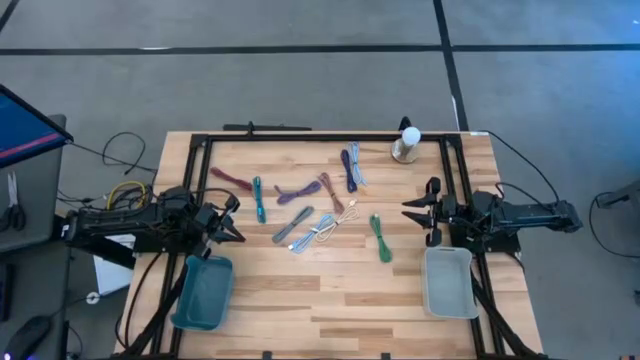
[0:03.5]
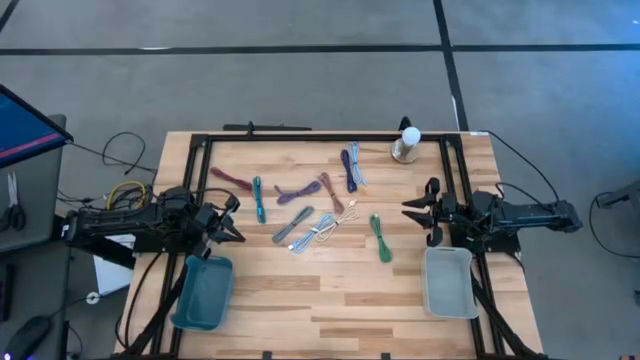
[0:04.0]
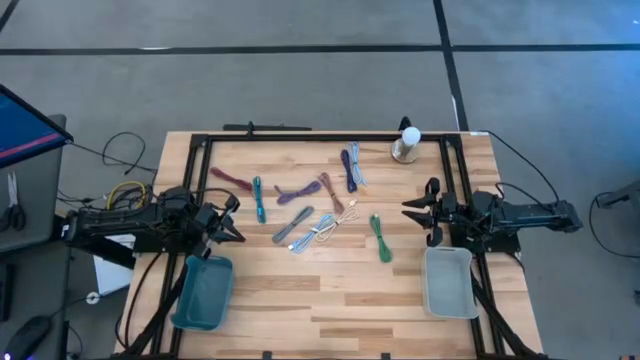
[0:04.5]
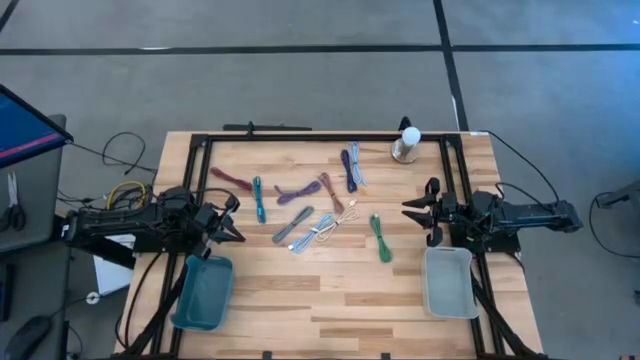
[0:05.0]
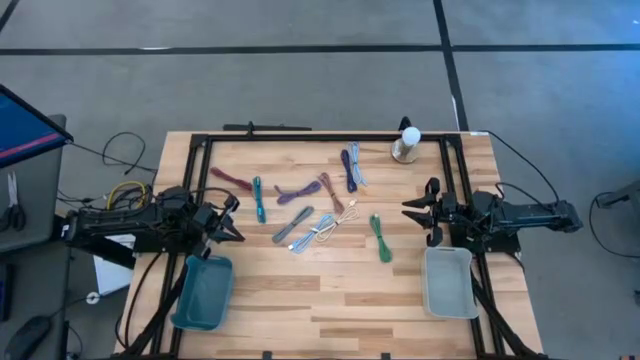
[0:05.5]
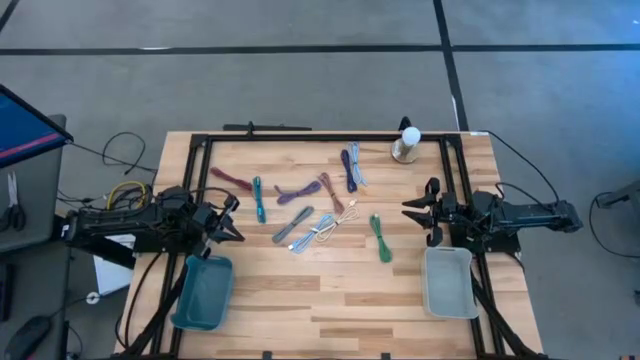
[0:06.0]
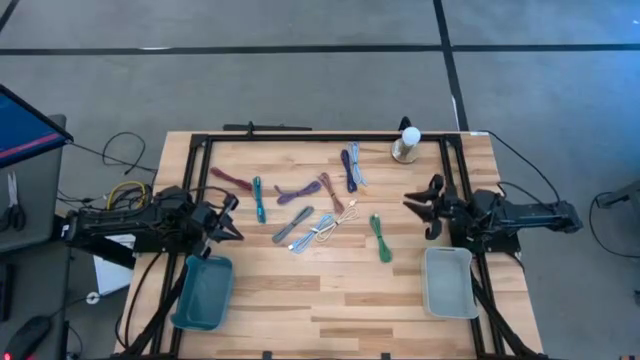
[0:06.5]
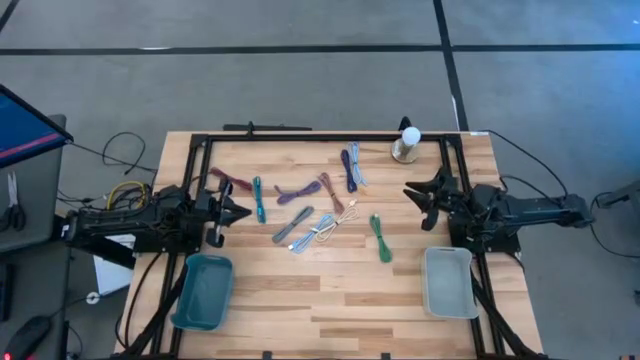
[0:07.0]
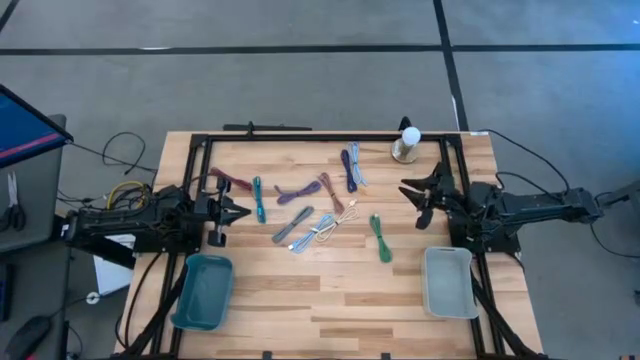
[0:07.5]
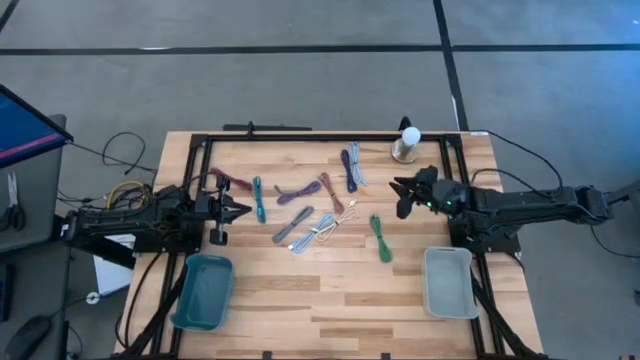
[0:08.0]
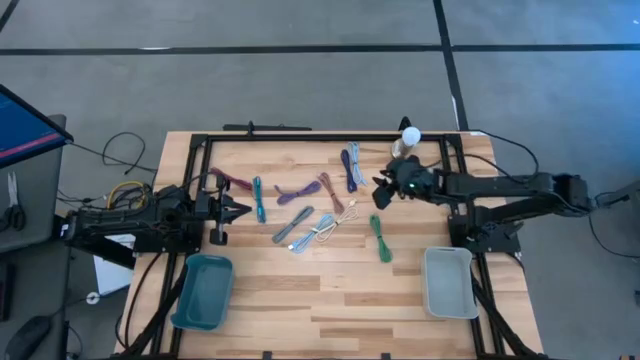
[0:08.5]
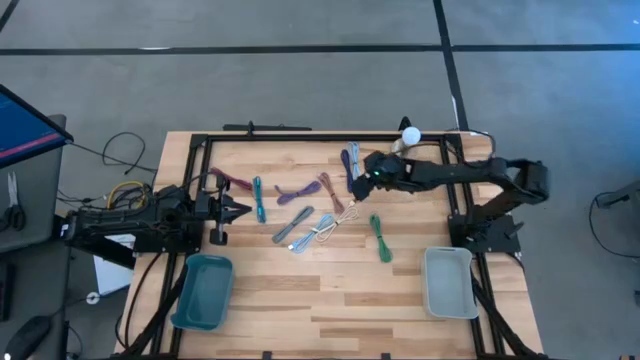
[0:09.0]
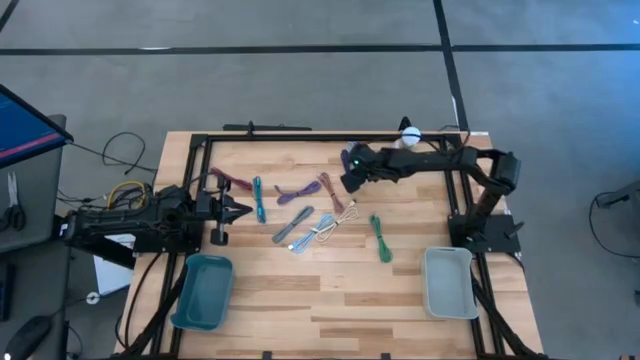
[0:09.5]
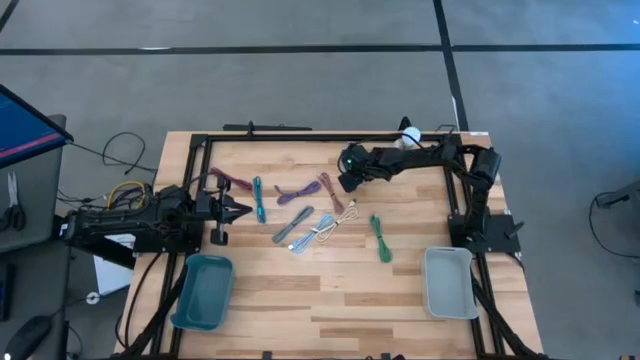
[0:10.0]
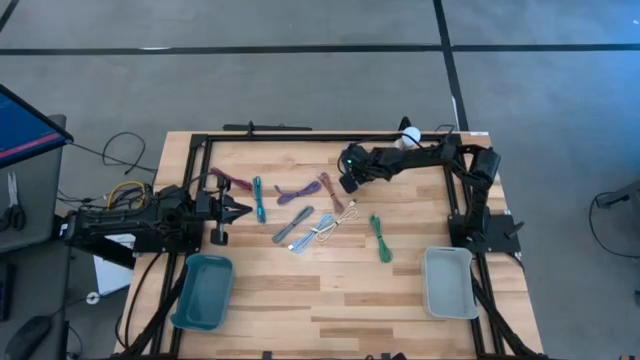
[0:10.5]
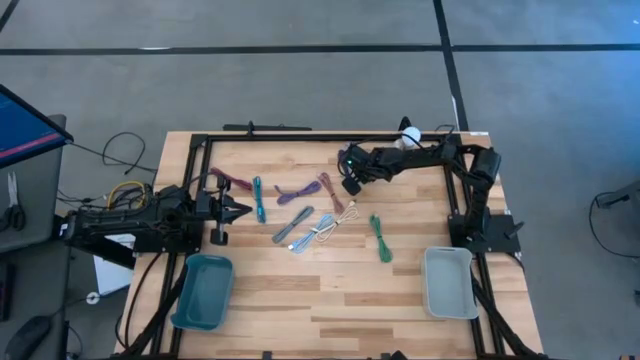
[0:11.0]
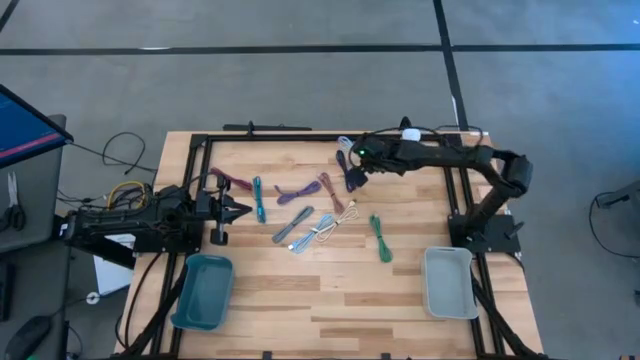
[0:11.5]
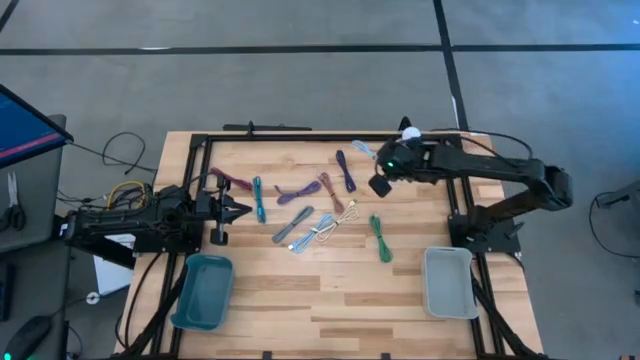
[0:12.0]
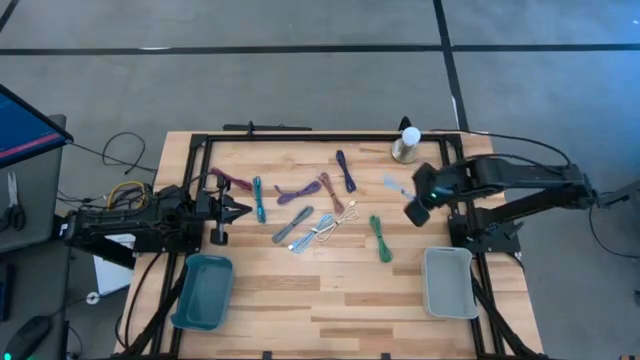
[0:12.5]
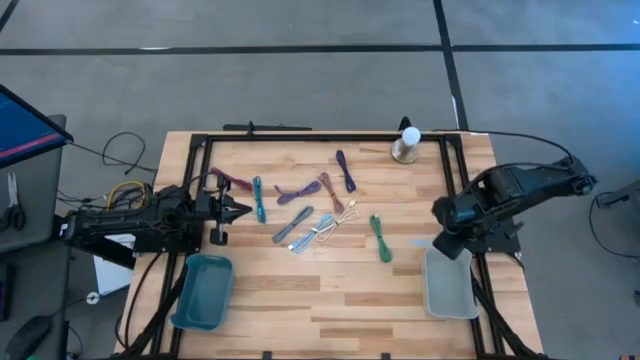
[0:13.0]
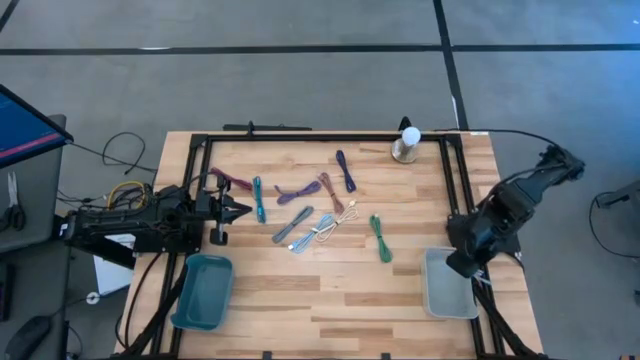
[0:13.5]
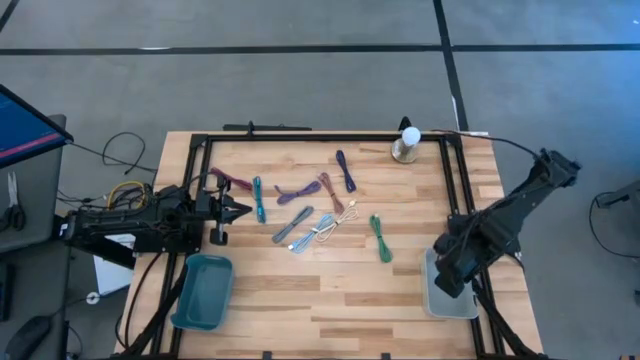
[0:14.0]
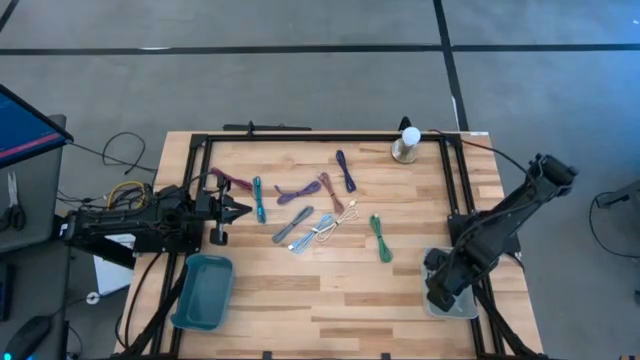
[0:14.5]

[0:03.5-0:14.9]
Task: Pick & Place USB Port
Put the light blue USB cable into the gray bin

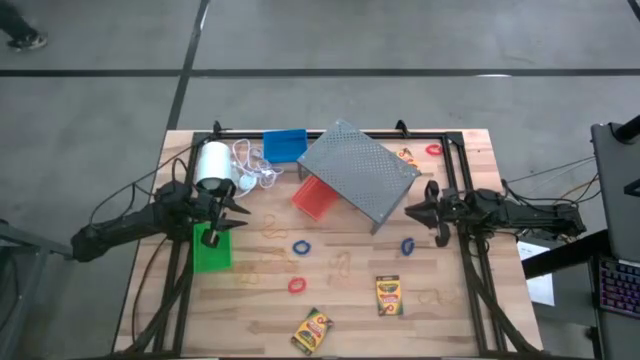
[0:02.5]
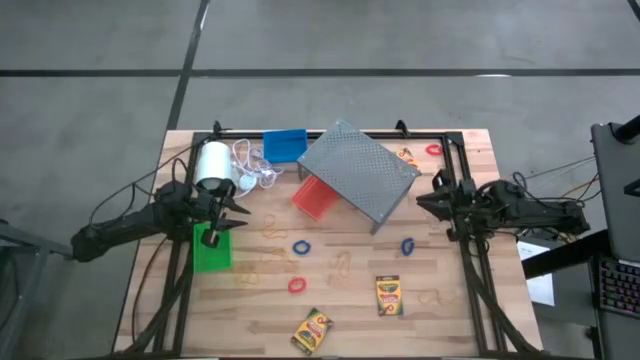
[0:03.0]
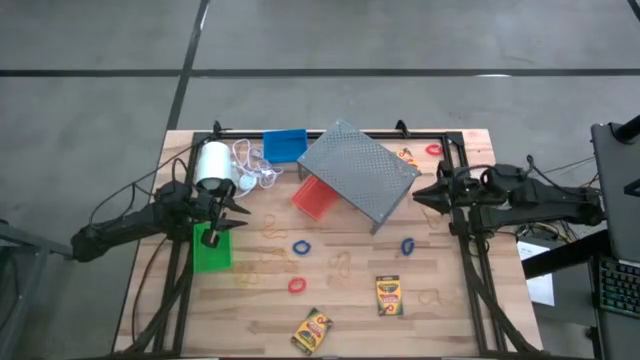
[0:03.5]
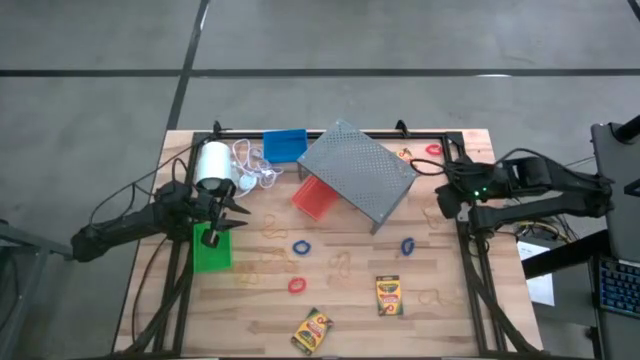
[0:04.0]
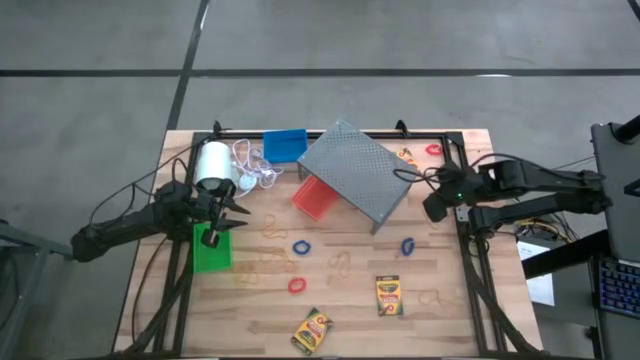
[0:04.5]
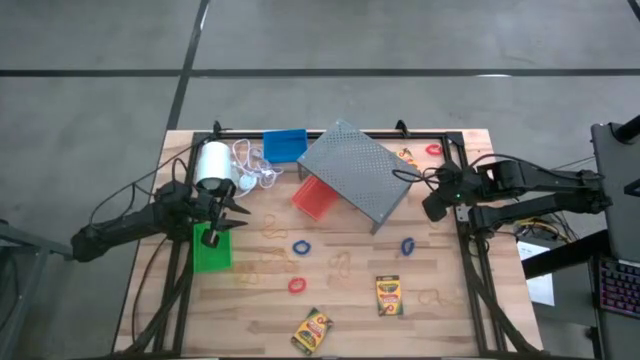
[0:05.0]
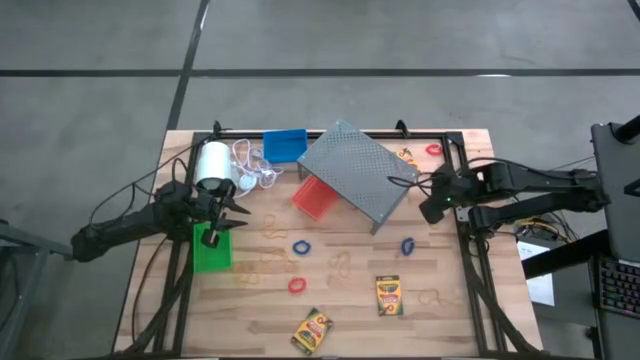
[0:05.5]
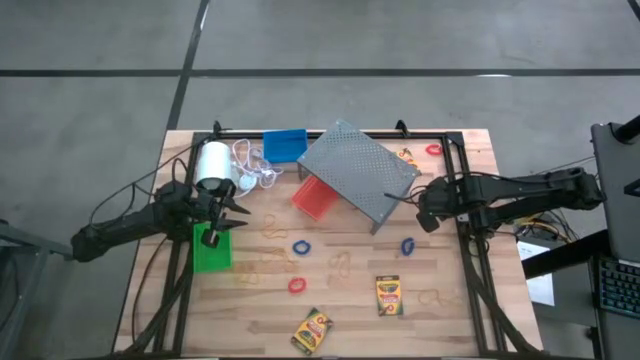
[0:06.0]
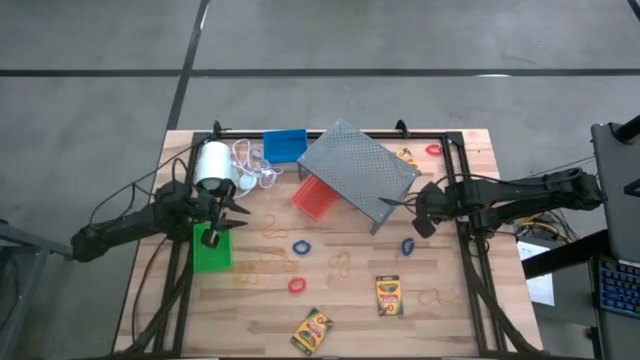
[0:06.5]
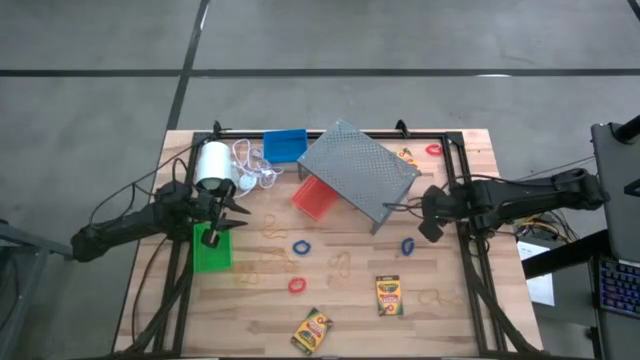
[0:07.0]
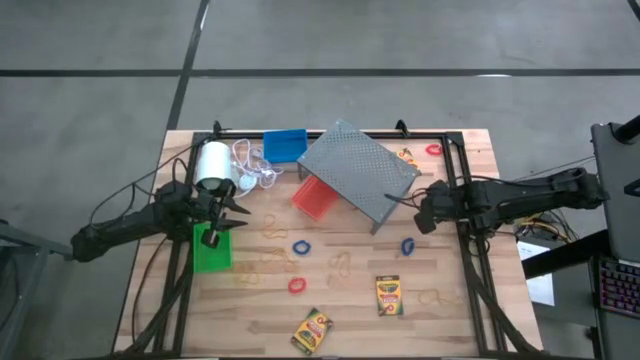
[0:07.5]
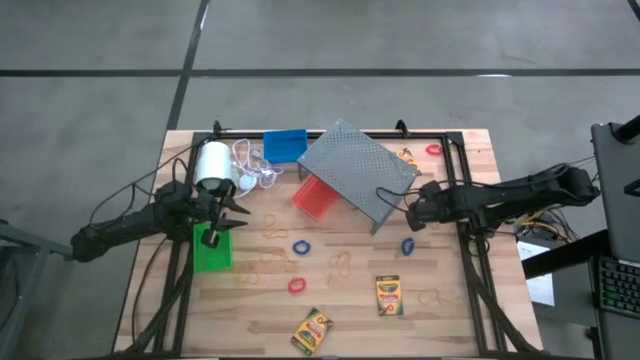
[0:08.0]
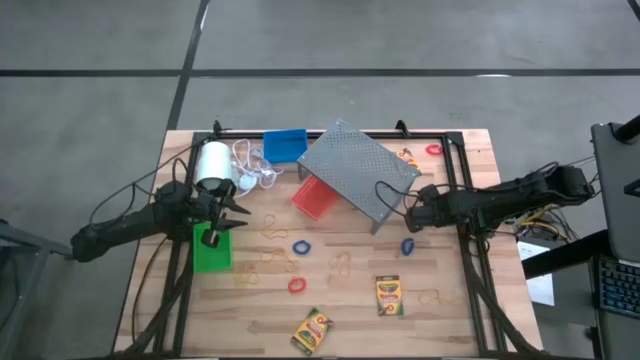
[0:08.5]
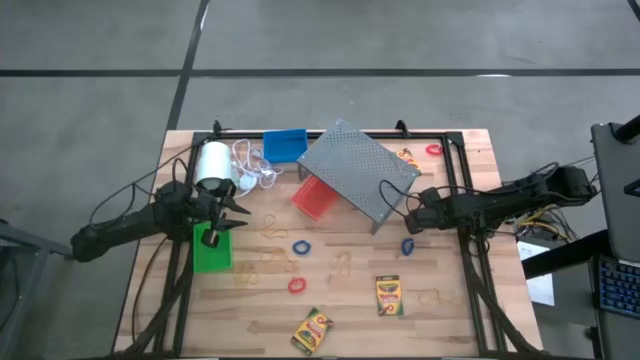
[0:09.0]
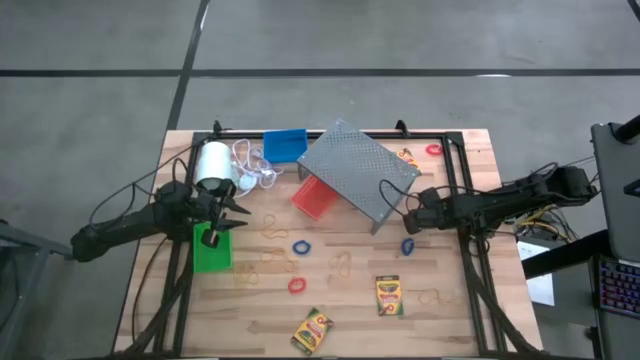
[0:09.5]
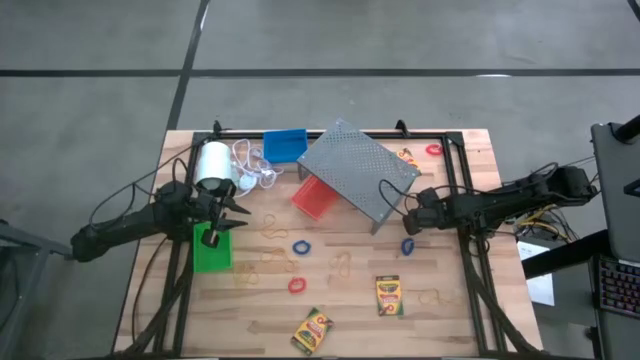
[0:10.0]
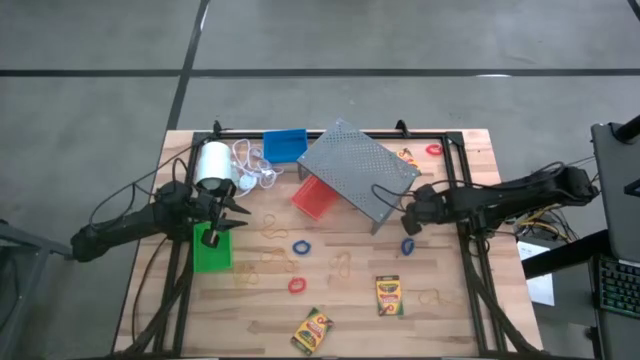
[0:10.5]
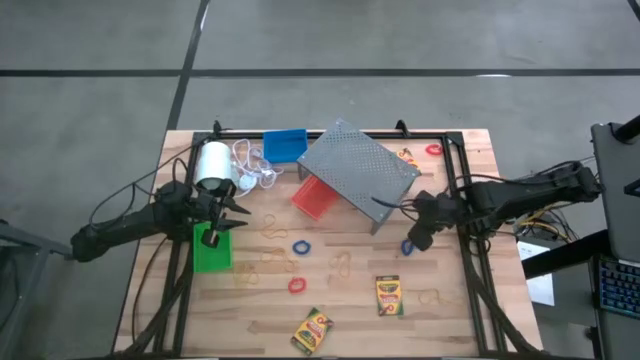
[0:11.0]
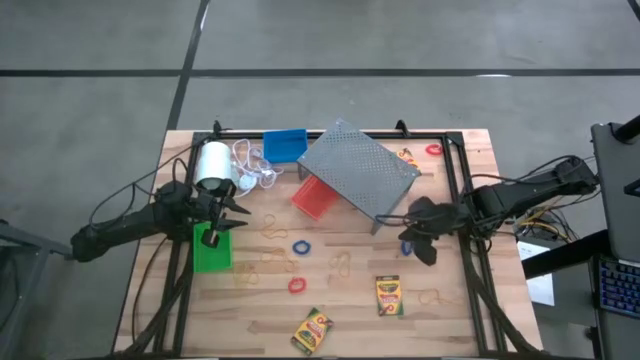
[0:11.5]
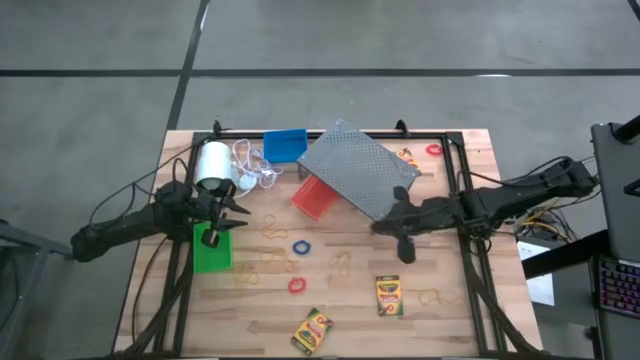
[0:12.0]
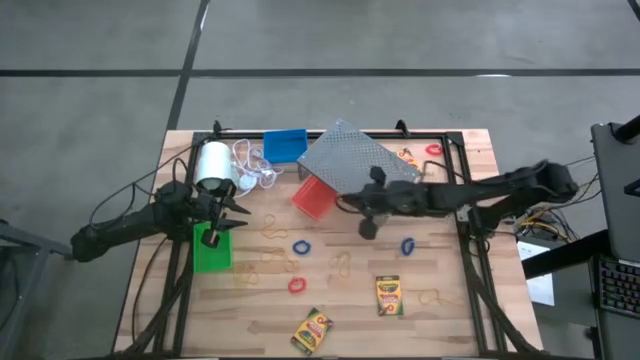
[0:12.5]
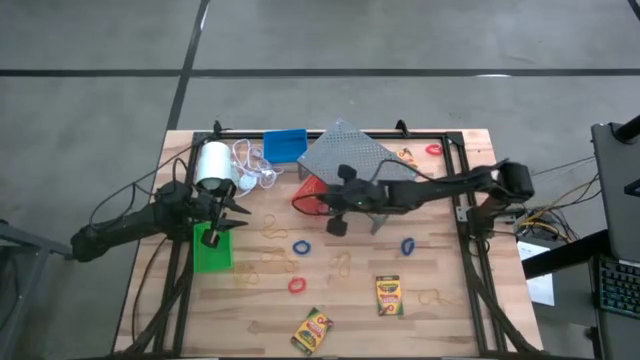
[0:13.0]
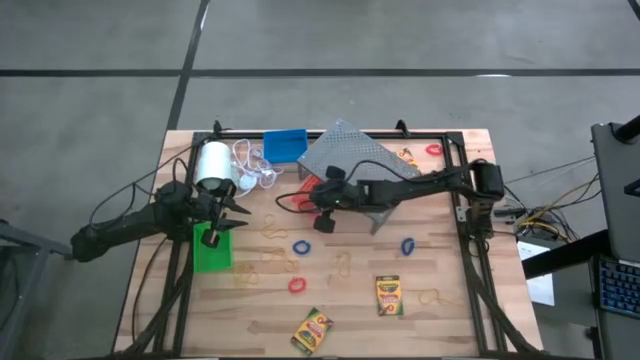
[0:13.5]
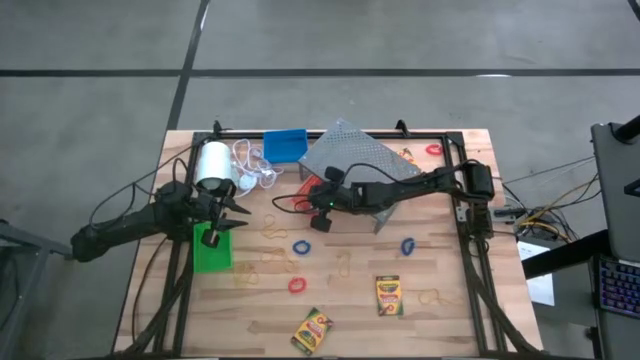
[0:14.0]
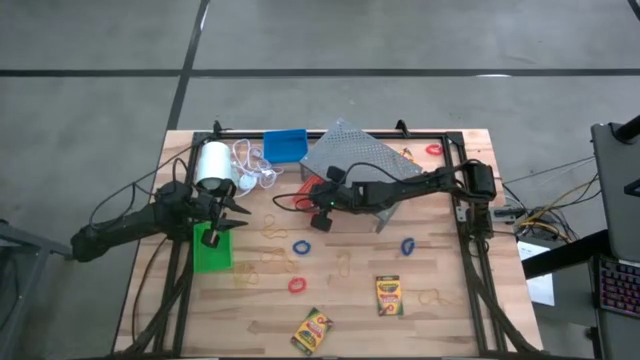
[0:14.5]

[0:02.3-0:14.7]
Task: Pick & Place Office Desk Supplies
Put the yellow rubber band into the orange bin
